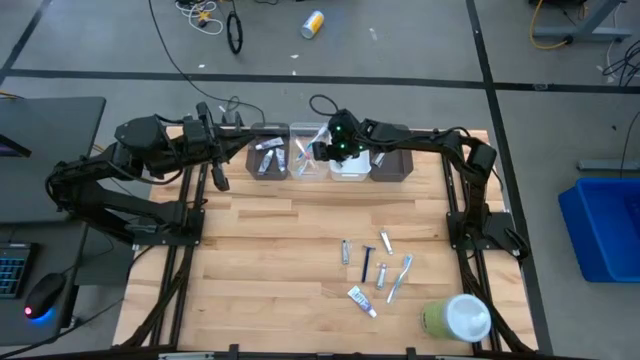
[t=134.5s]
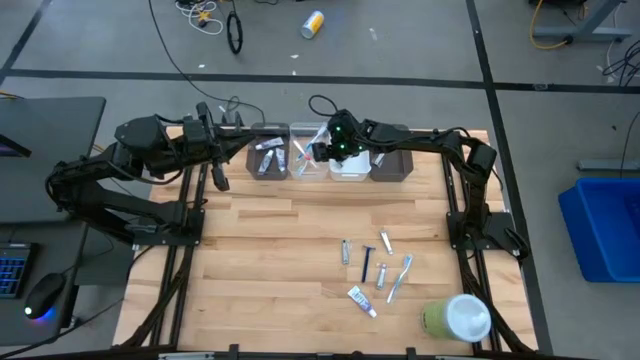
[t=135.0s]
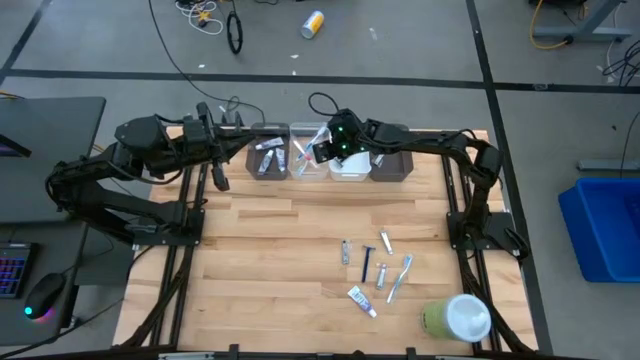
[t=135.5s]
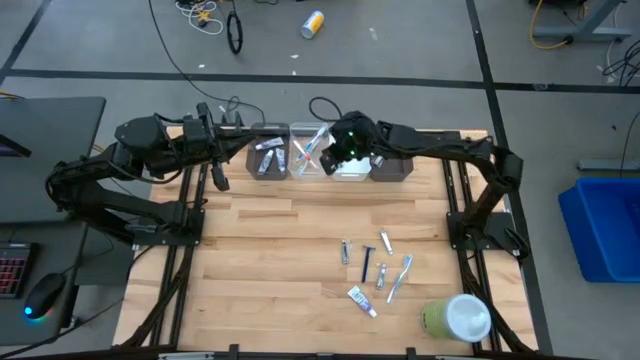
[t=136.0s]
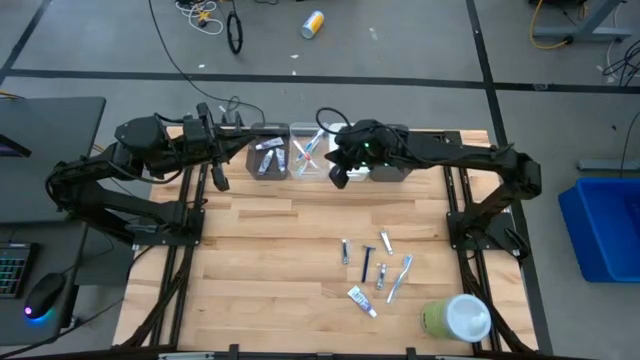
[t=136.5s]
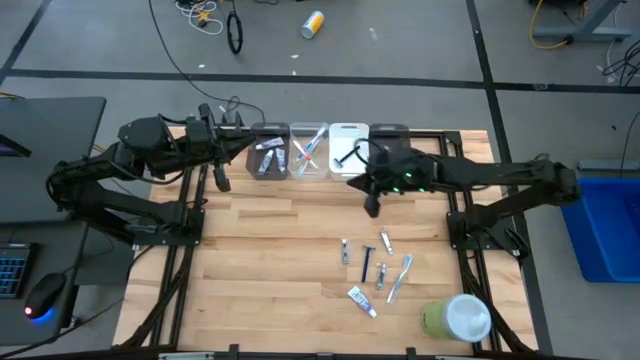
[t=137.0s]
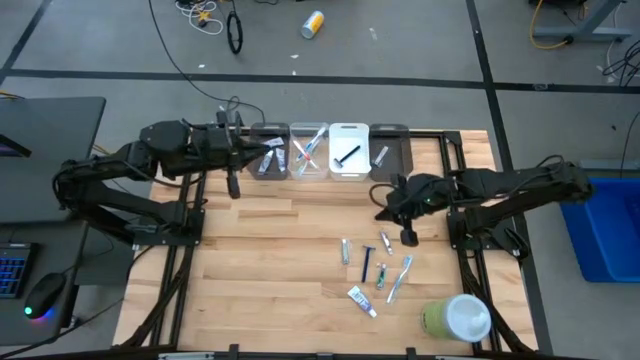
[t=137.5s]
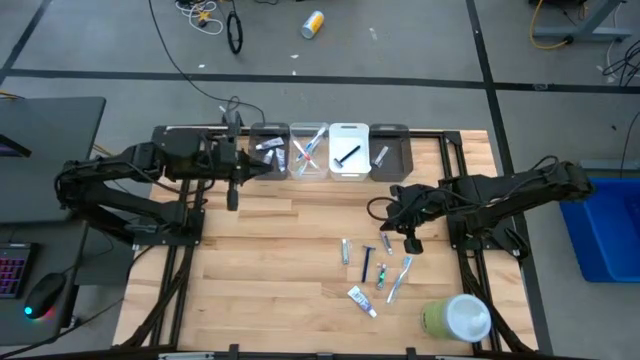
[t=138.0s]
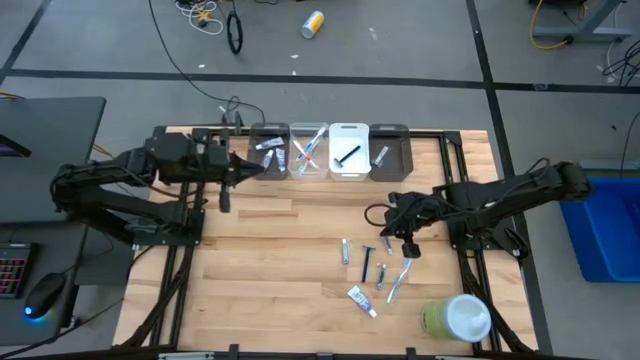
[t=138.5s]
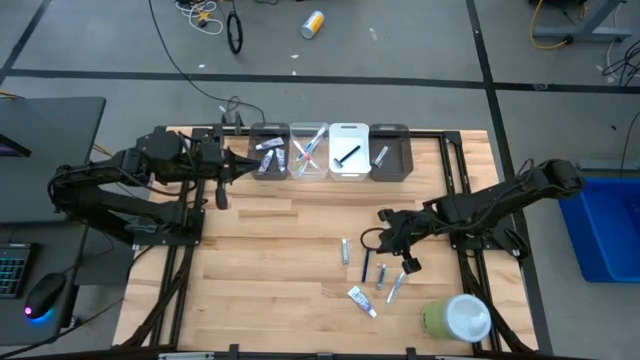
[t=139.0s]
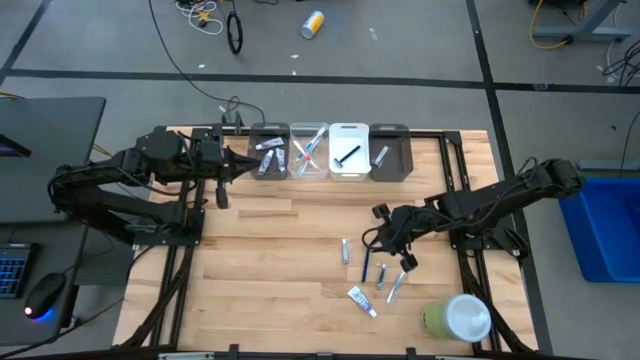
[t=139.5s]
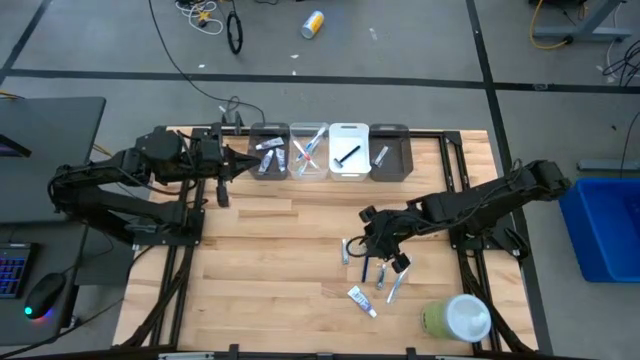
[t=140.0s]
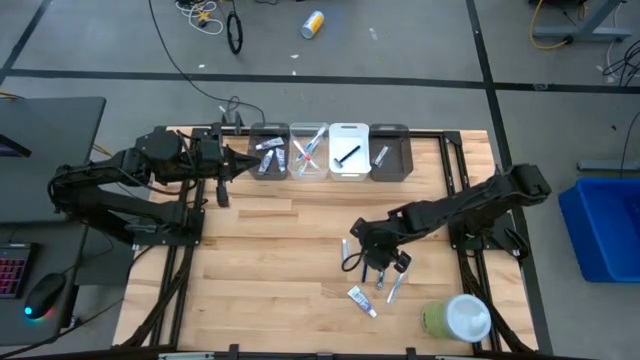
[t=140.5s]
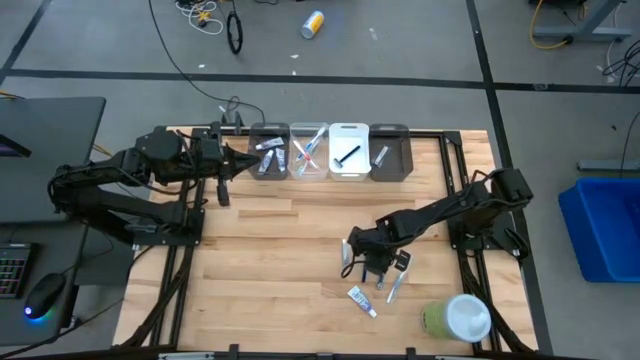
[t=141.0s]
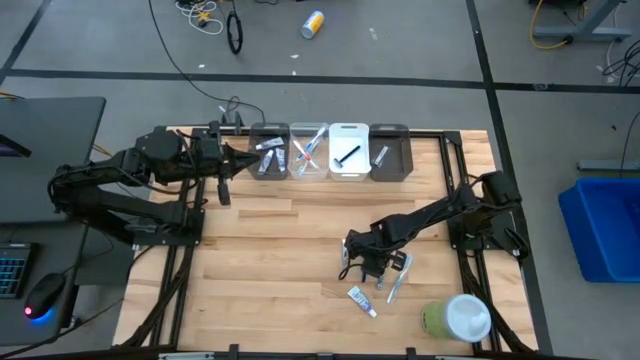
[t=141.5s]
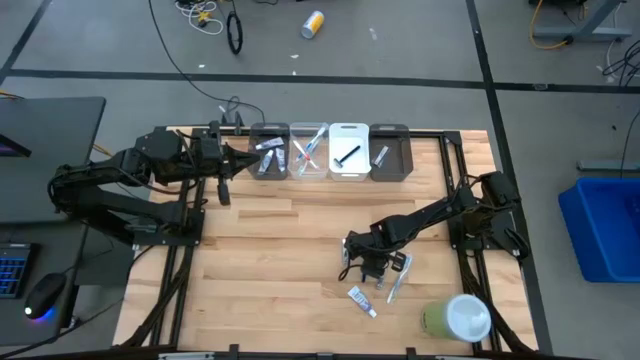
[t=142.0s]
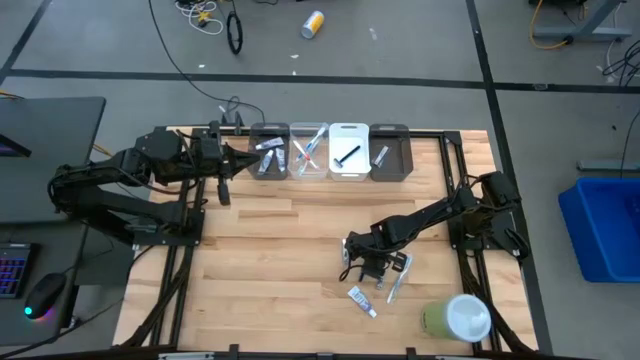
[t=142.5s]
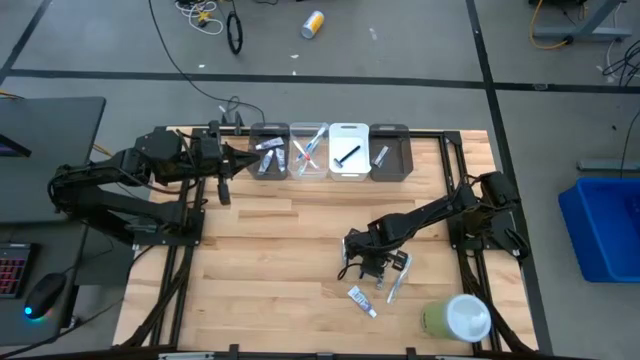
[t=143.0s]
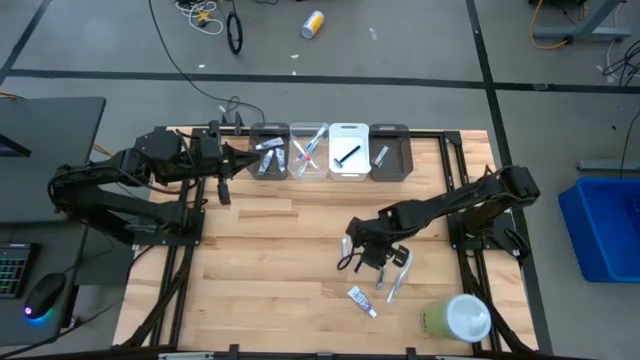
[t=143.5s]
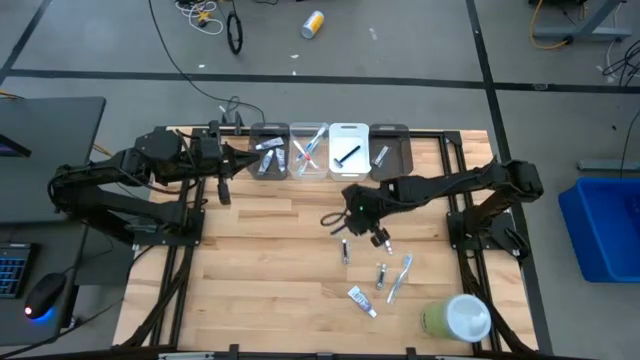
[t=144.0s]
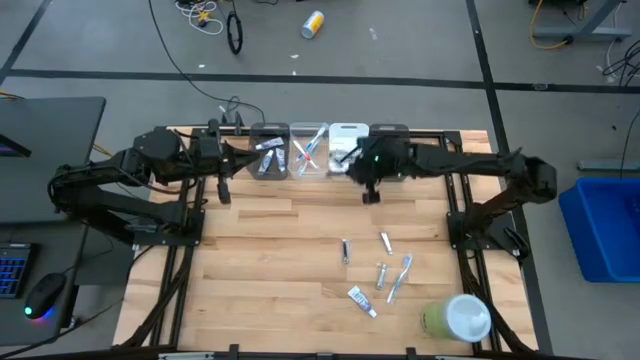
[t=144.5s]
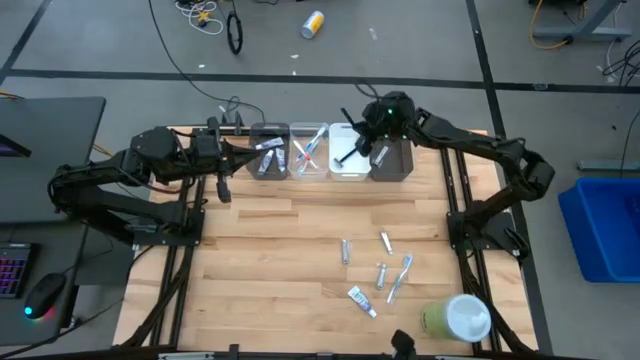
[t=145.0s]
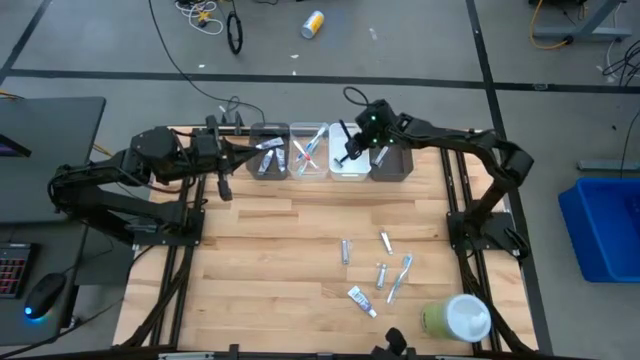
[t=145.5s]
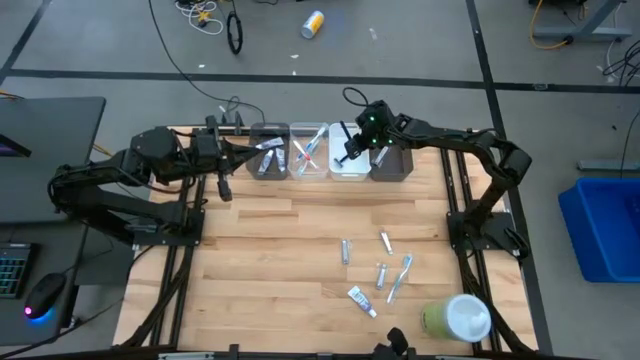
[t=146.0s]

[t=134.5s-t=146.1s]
Task: Pick & Place Travel size toiletries
Put the blue razor into the white bin

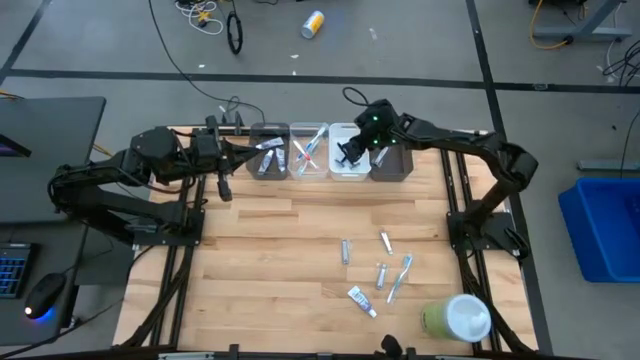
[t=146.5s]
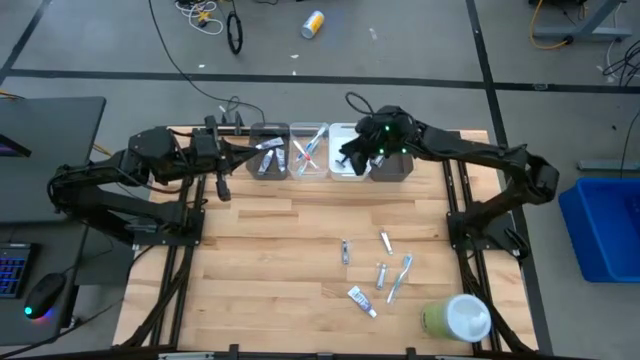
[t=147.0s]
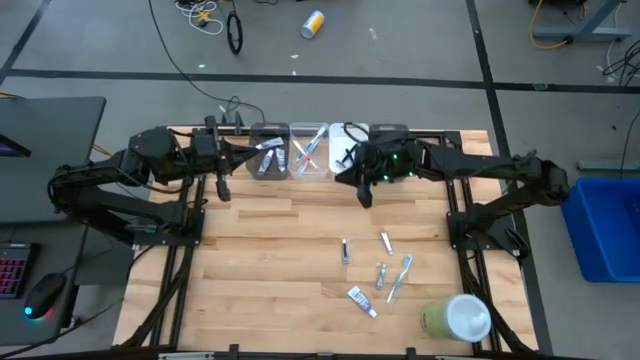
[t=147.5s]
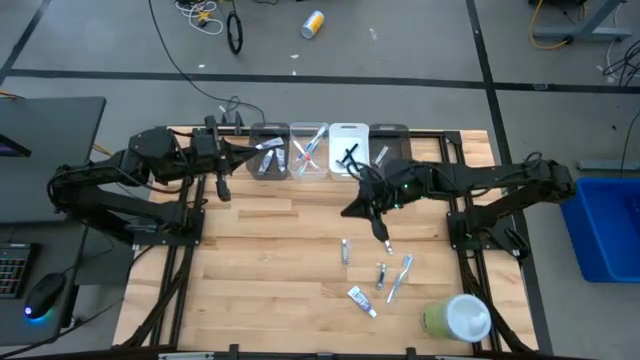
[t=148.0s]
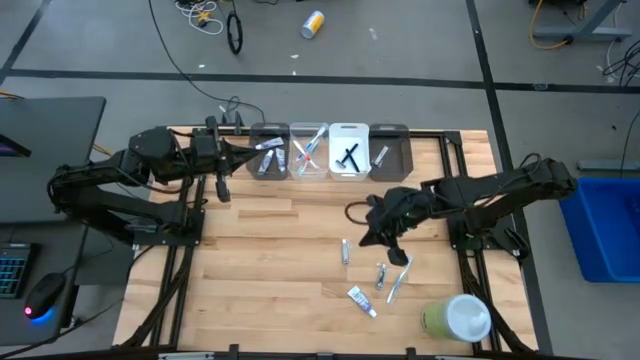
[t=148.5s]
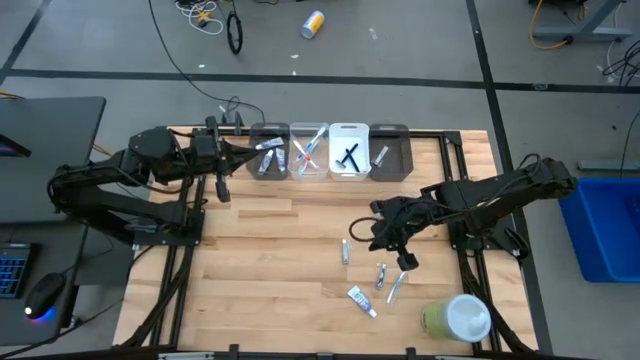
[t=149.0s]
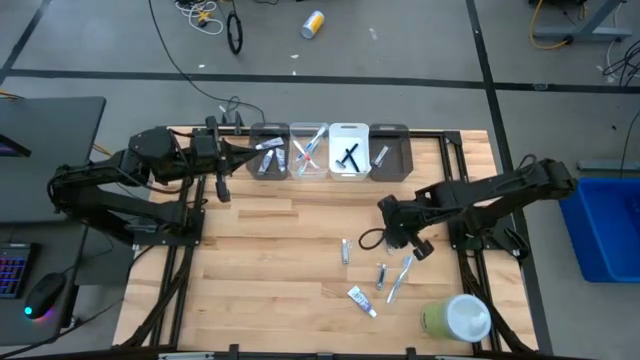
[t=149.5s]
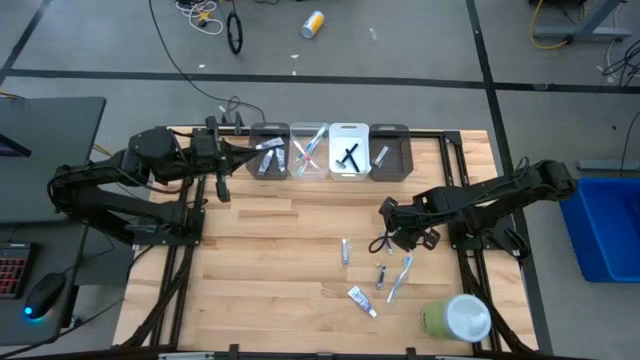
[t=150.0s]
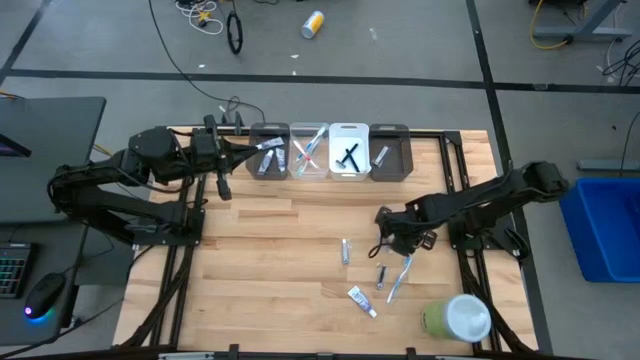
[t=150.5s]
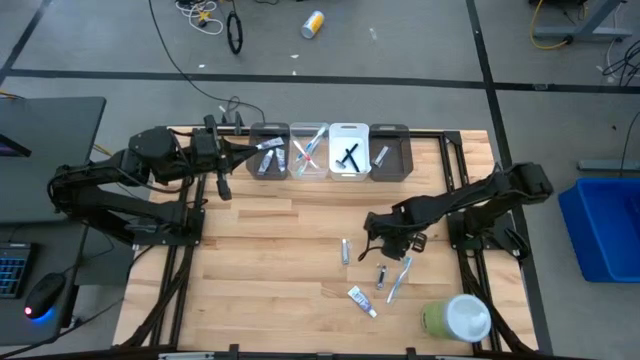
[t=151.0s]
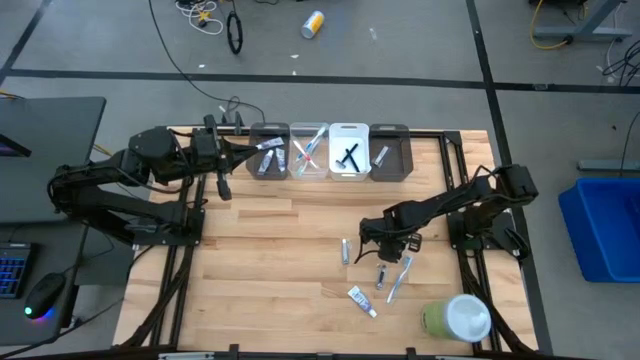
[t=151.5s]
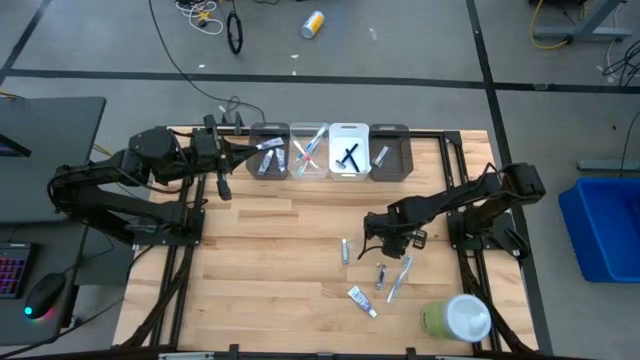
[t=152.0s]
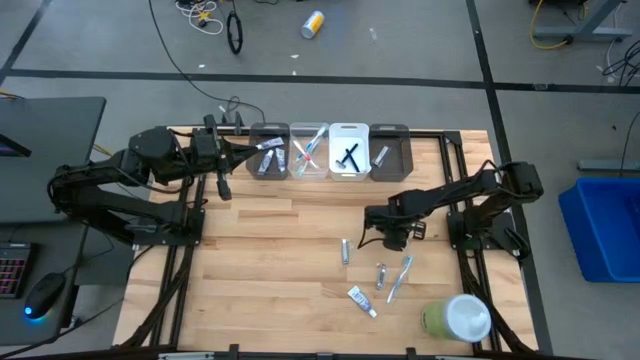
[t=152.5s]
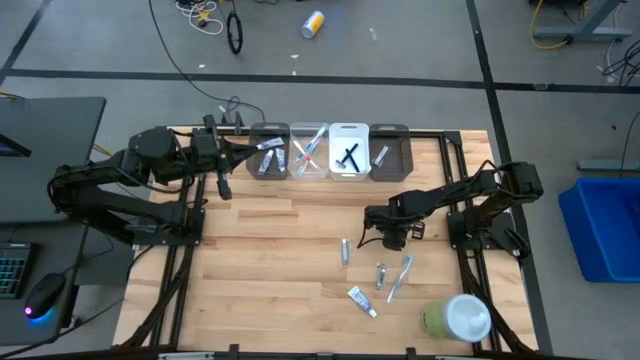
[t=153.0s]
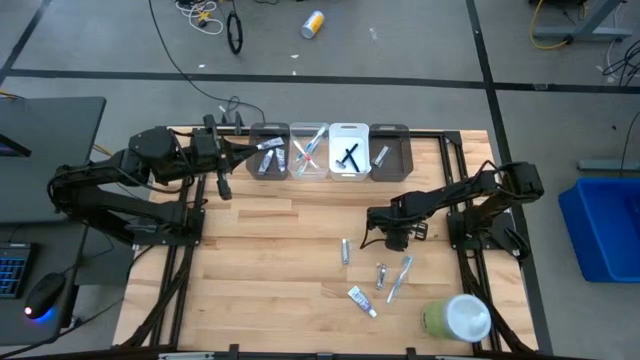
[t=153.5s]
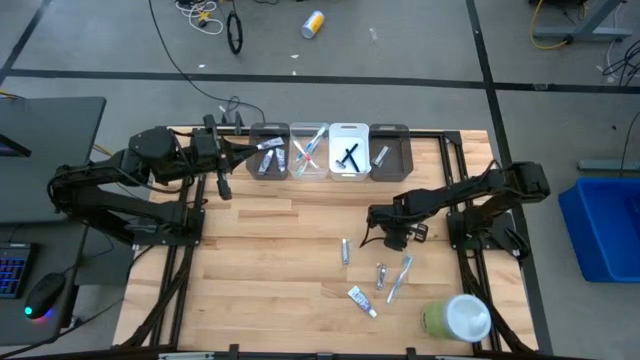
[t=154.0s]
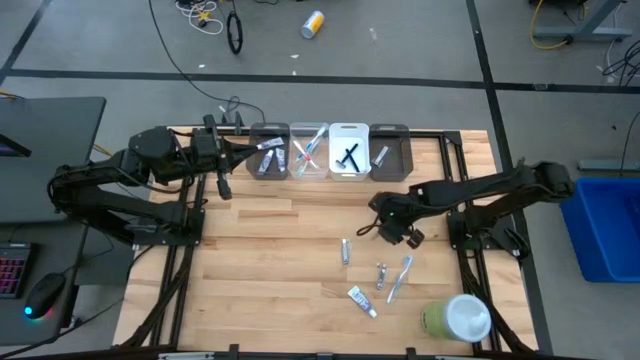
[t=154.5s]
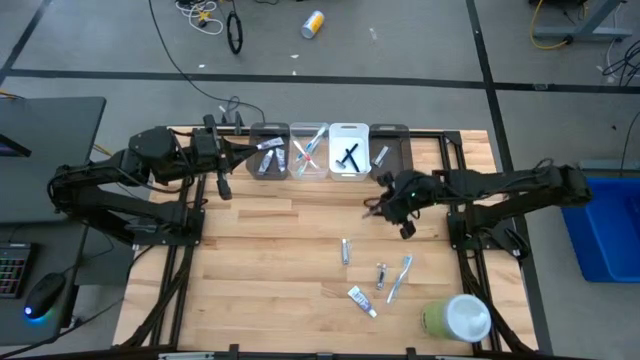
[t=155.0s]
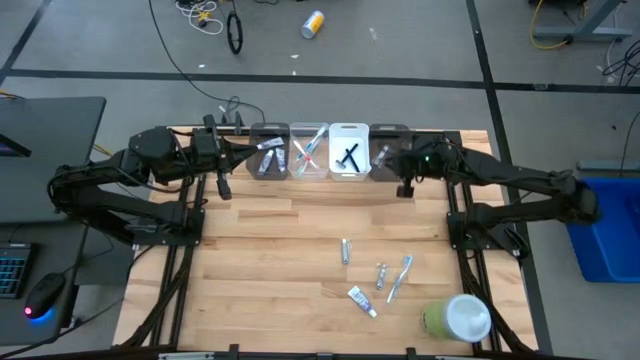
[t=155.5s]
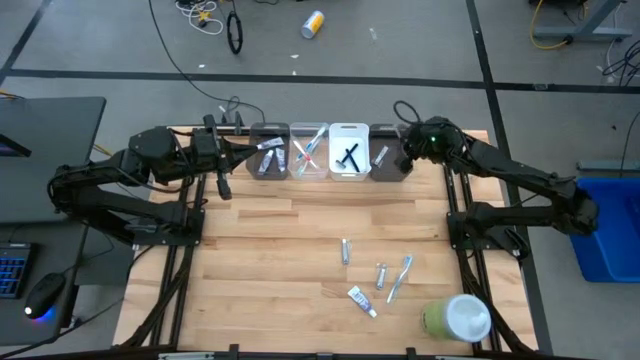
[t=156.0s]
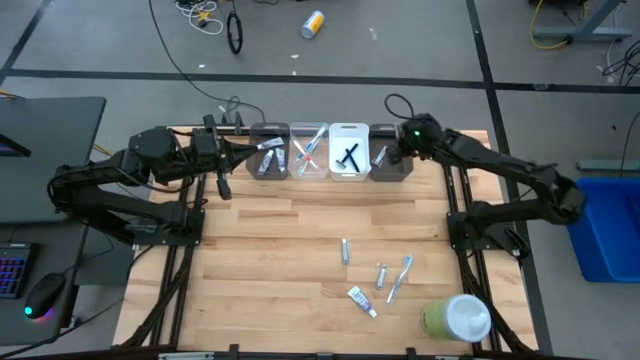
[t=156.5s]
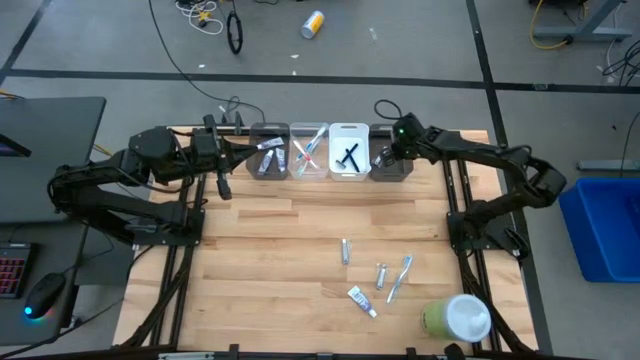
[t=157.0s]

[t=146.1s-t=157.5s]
Put the silver nail cutter into the white bin
